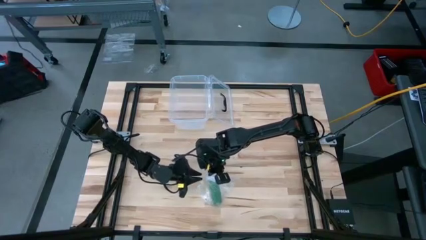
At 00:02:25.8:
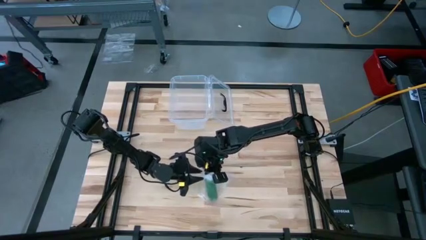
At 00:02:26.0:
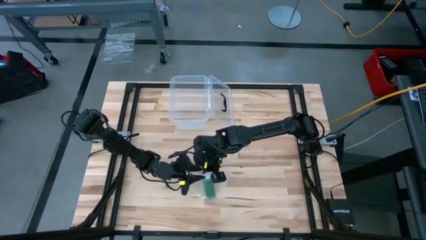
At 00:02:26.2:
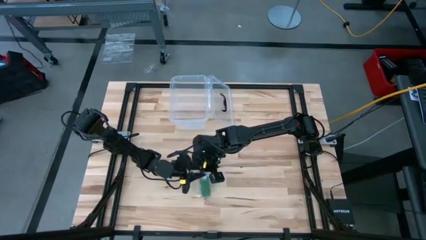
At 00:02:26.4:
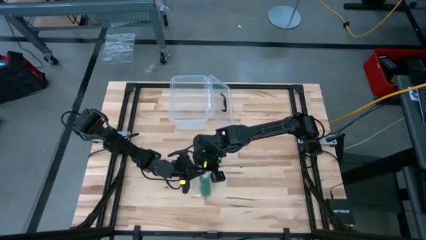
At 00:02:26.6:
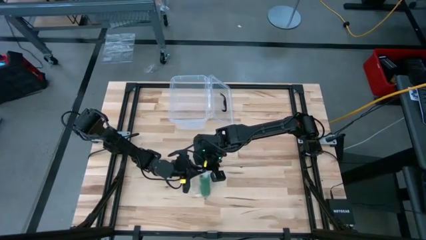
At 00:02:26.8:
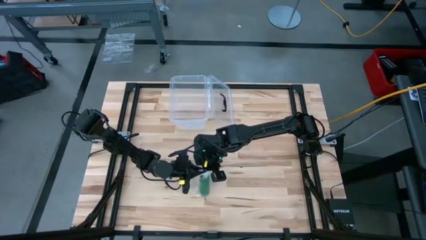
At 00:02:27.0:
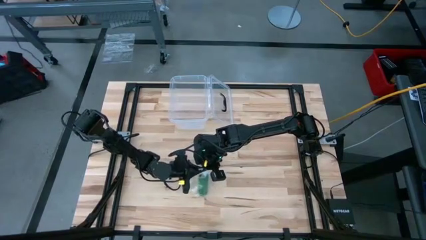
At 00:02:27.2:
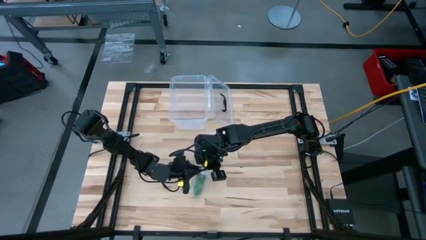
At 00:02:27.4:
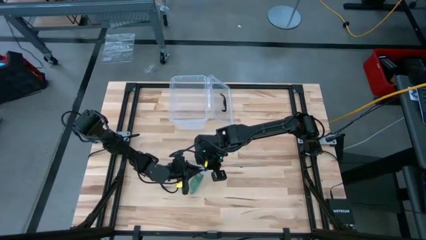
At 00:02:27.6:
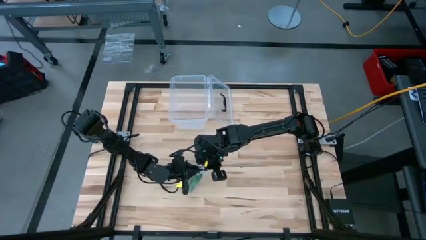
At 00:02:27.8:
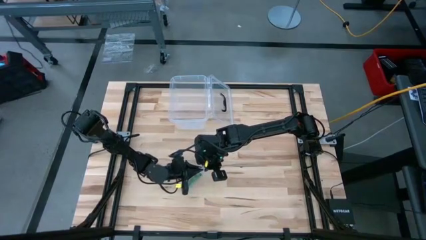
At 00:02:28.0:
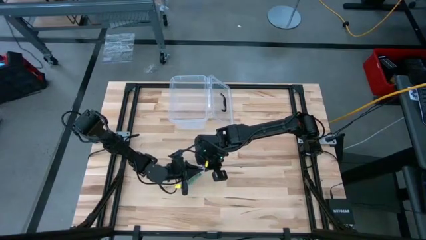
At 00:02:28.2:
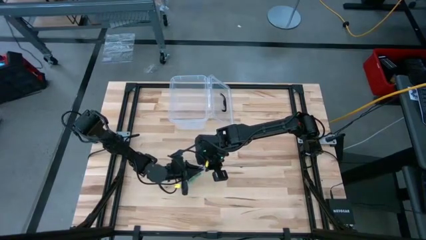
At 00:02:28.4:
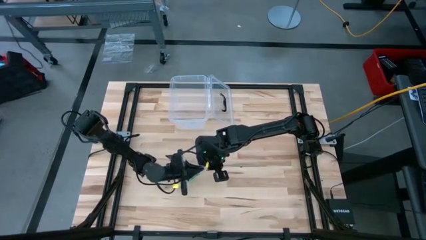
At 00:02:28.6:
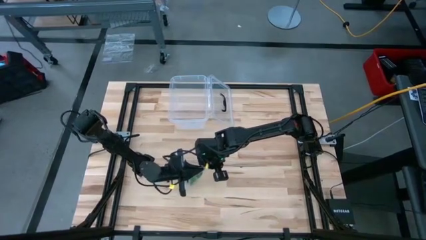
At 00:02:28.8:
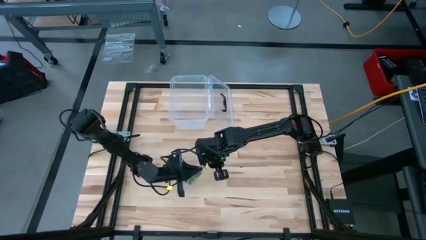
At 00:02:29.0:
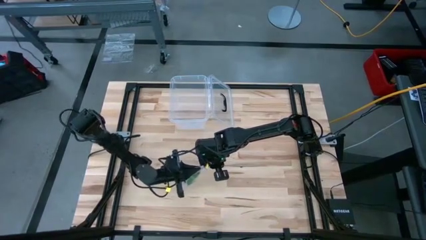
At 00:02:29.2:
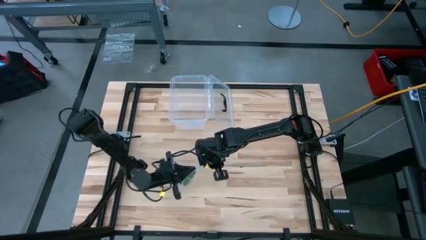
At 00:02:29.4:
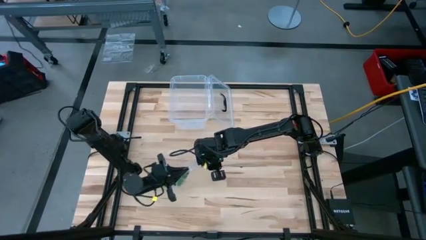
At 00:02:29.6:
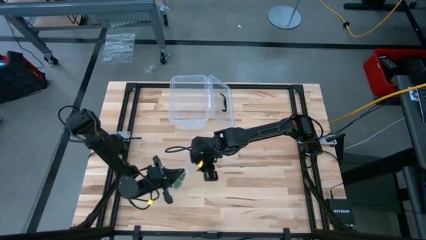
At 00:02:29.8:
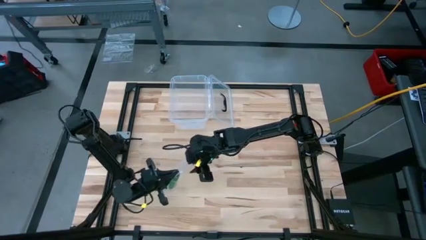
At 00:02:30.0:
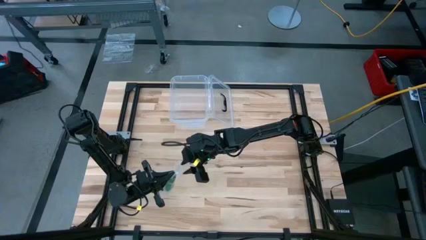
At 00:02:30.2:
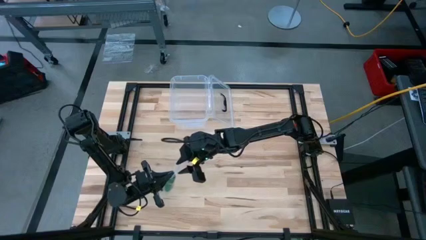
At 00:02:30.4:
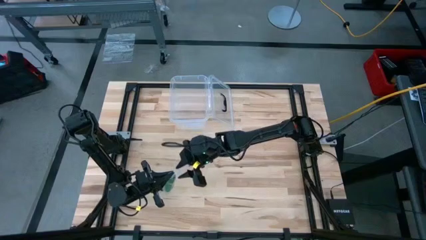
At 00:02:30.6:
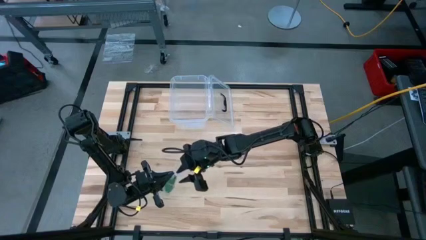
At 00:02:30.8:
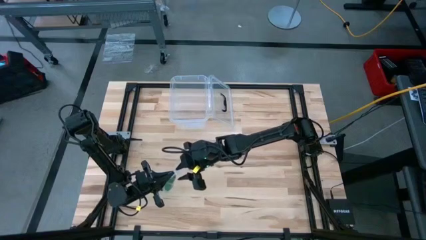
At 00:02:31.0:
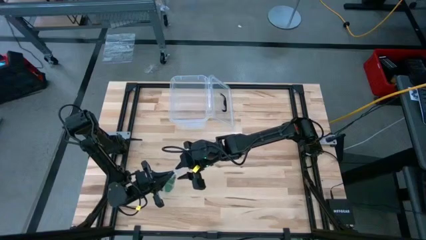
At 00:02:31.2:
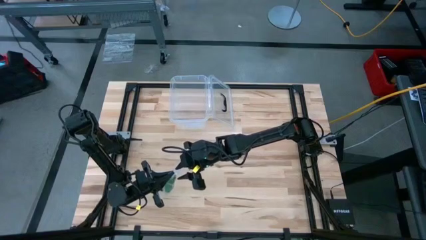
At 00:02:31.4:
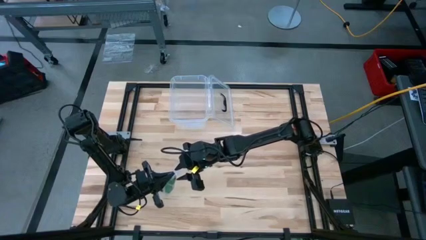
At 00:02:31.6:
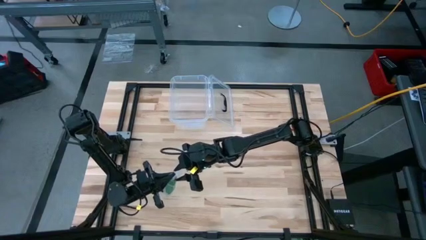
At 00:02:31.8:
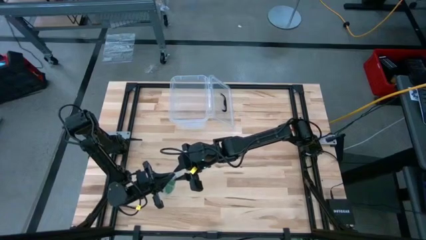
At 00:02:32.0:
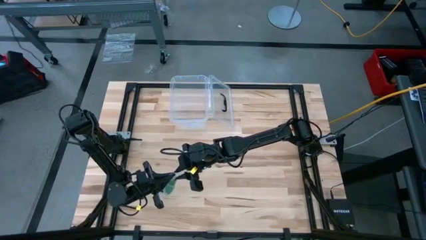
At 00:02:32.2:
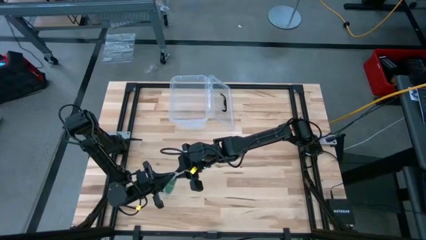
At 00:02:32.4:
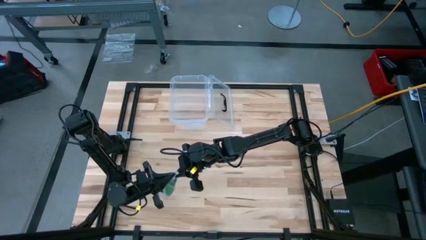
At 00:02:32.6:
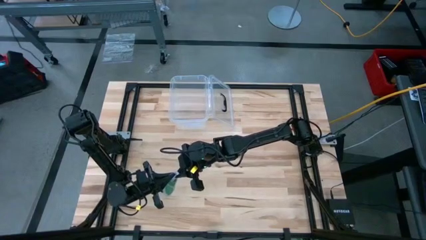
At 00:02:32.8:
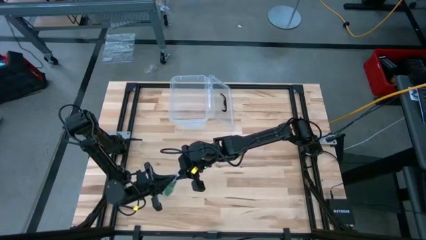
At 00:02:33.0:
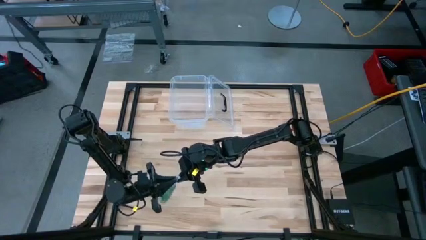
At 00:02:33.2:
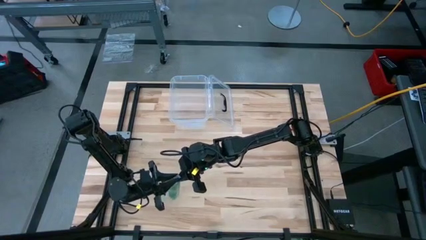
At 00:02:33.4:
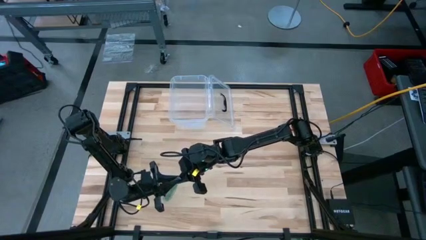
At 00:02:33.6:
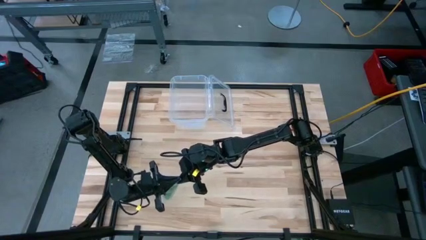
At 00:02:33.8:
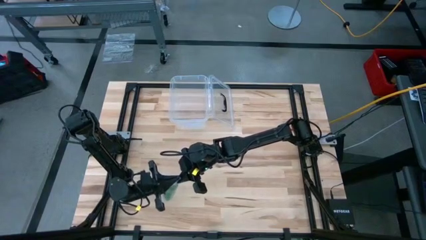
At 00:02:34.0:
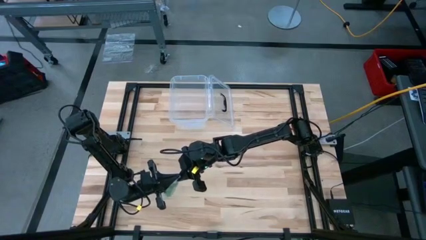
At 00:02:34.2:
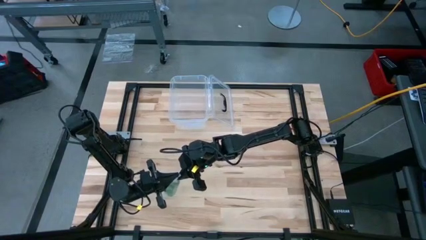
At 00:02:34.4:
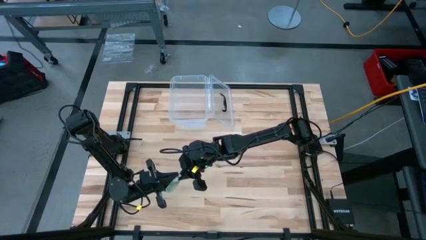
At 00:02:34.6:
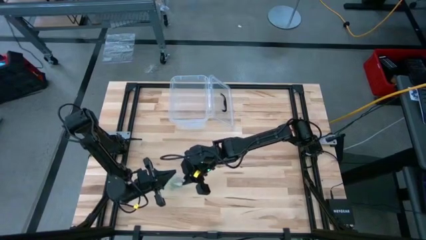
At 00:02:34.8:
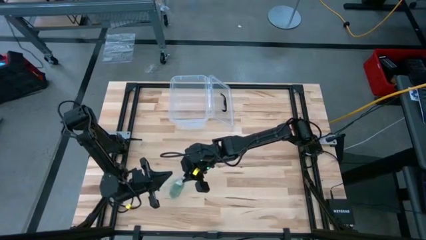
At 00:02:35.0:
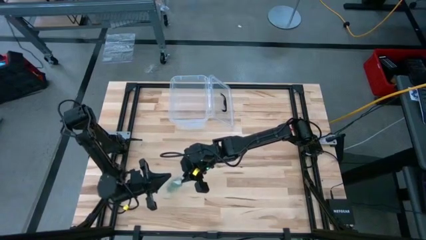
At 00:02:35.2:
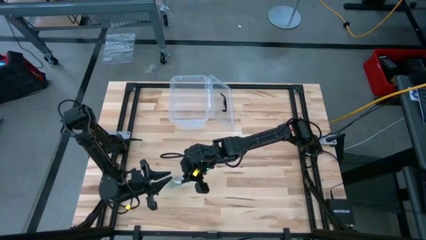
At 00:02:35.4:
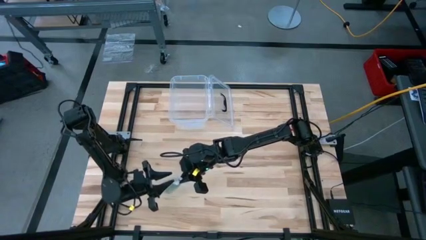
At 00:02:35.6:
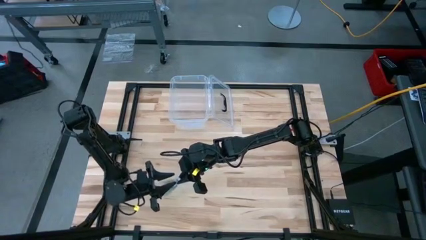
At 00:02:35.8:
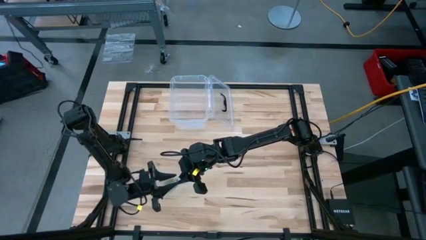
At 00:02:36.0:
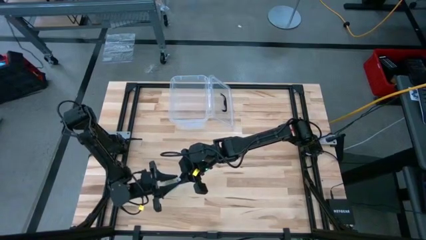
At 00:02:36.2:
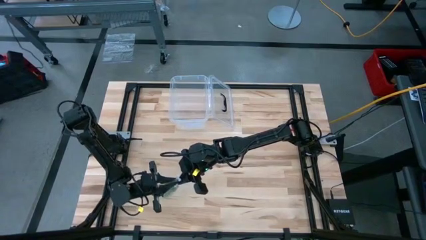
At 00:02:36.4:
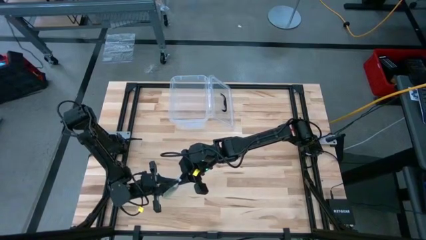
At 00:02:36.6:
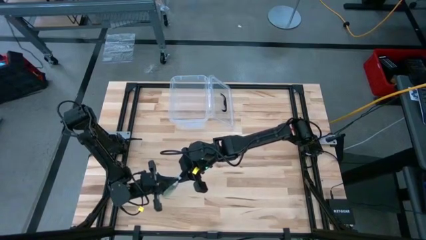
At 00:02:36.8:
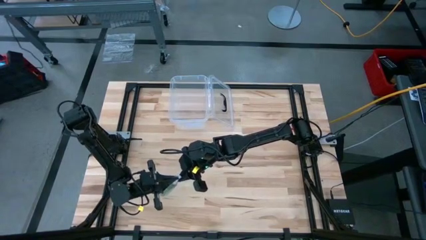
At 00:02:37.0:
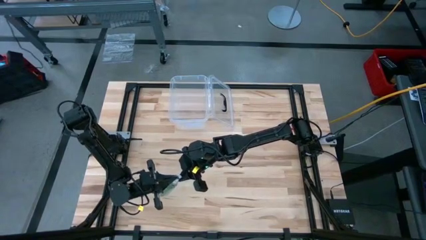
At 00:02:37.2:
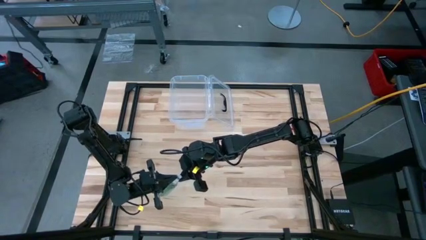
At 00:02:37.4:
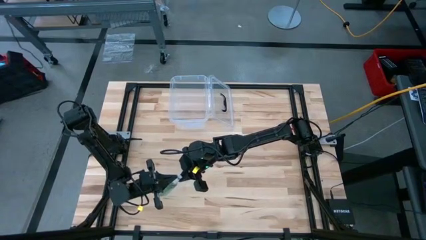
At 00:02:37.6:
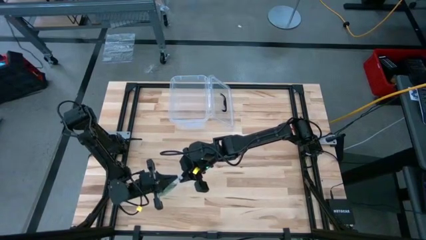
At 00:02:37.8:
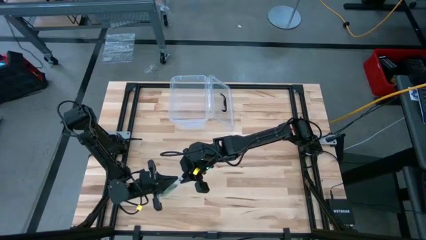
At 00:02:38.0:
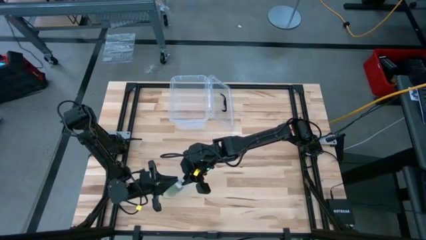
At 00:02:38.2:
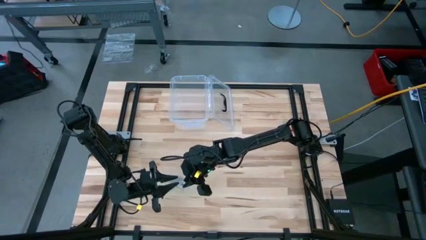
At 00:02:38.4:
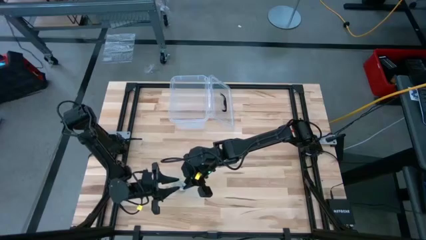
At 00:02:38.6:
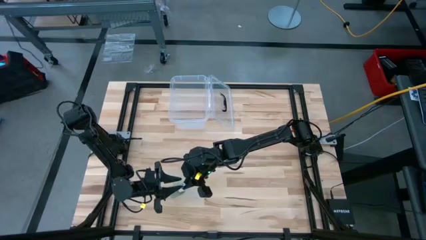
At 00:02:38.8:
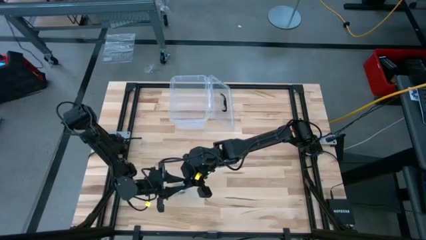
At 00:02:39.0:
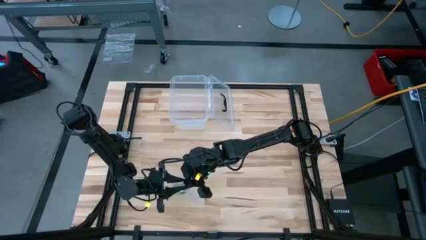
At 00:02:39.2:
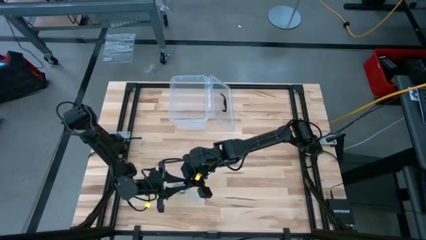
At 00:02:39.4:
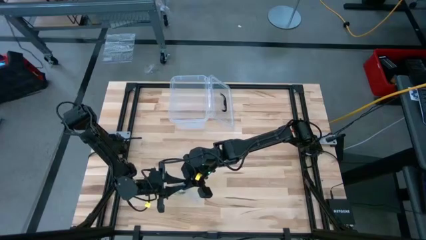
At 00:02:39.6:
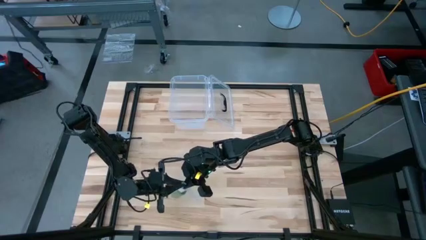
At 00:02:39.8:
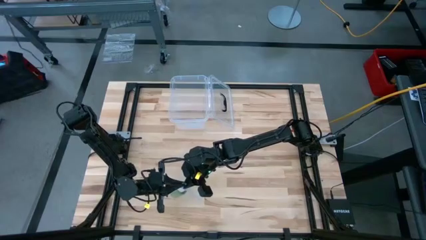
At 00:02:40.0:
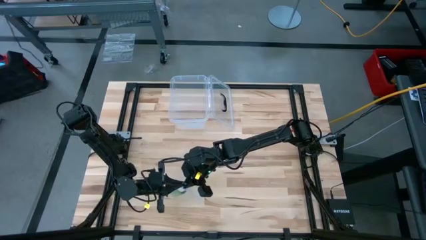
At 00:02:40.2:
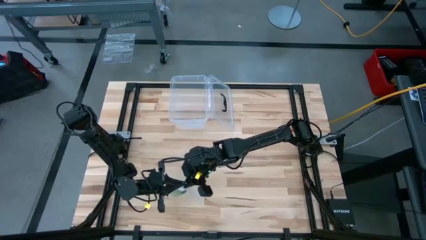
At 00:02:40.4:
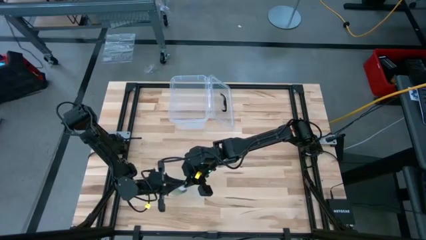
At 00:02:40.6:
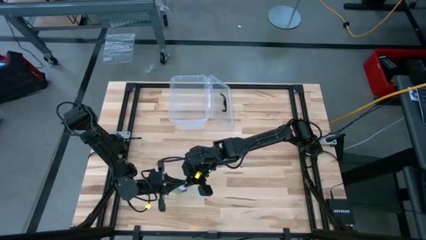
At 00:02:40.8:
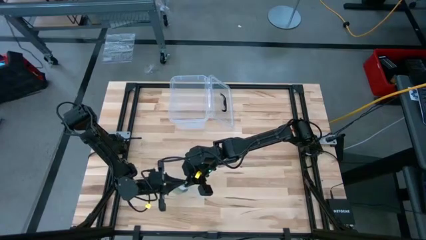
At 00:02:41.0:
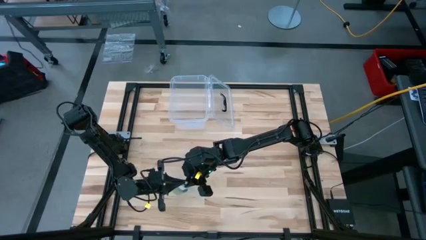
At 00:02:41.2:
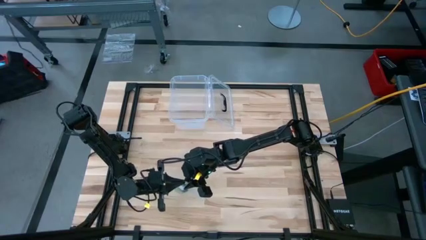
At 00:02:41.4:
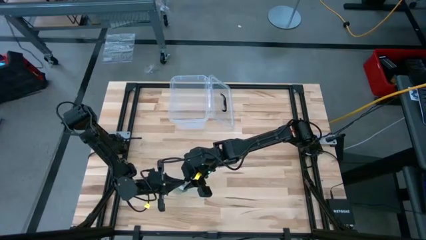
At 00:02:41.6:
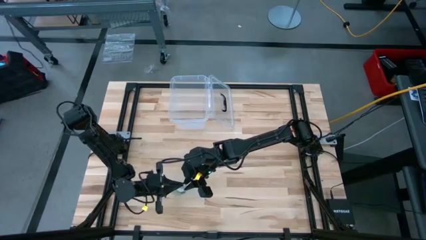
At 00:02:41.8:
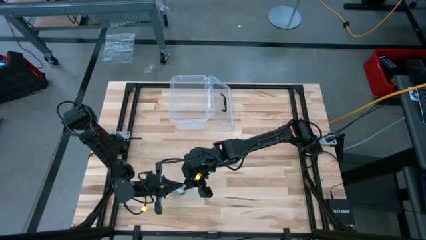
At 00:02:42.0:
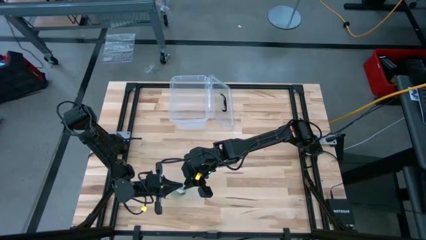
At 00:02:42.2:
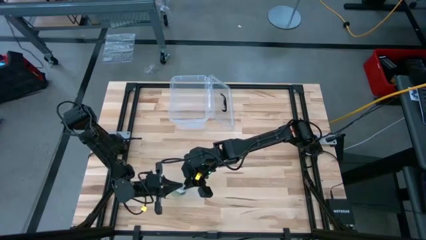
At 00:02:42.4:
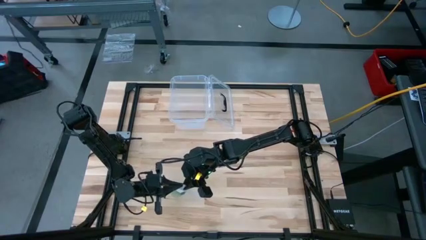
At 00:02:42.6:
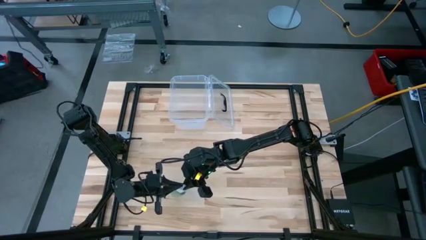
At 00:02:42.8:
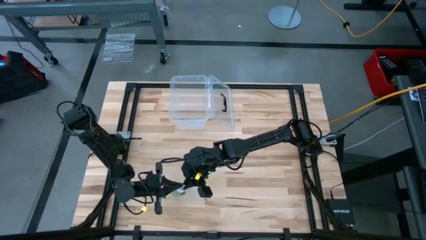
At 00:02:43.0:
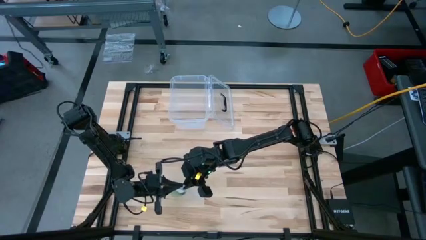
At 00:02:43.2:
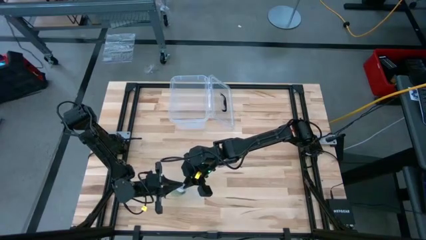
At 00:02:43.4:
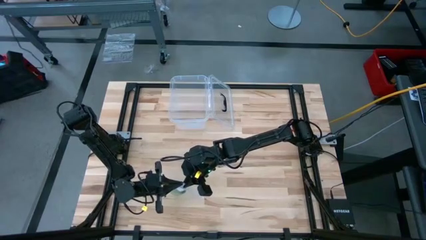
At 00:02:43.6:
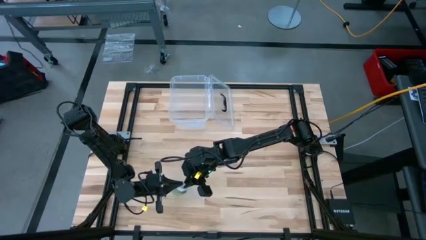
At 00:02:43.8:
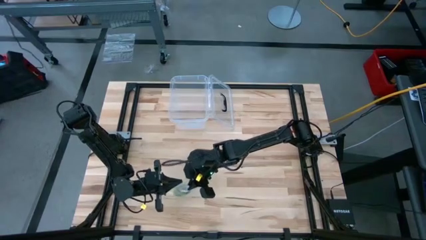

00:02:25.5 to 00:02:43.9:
Task: Roll bandage
Close the transparent zip bag
